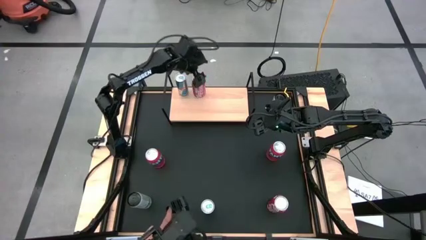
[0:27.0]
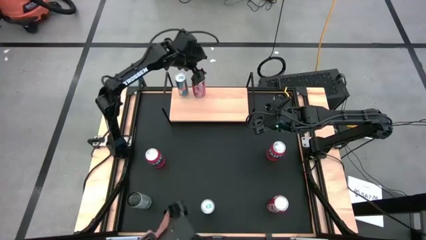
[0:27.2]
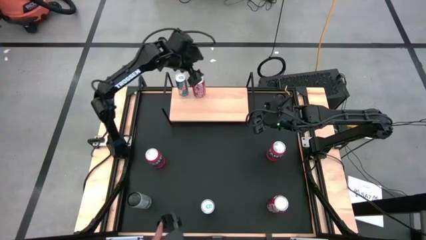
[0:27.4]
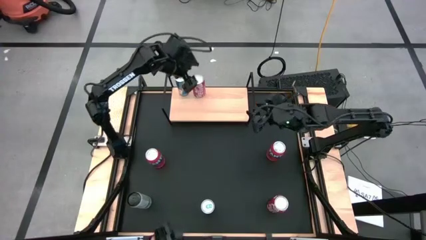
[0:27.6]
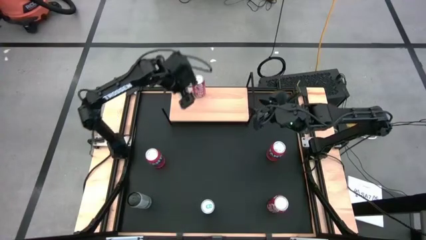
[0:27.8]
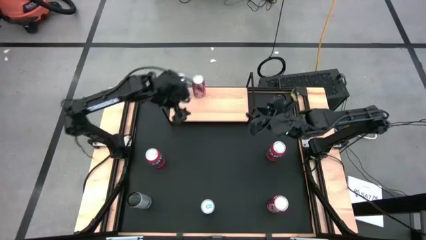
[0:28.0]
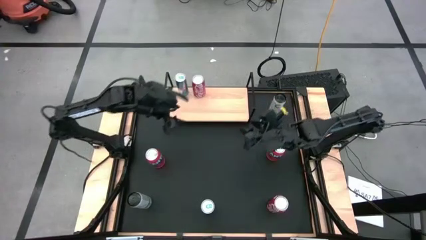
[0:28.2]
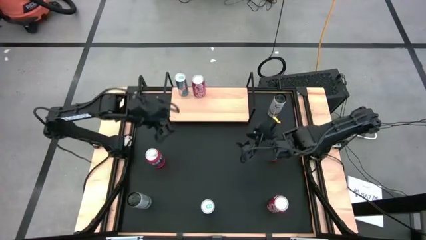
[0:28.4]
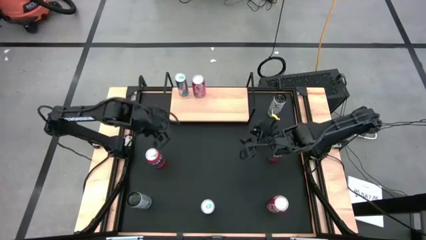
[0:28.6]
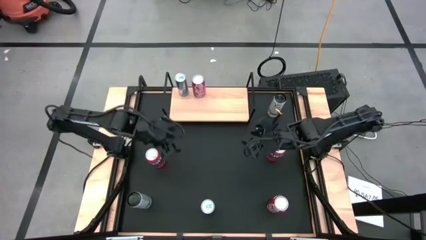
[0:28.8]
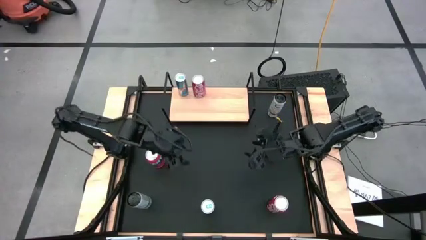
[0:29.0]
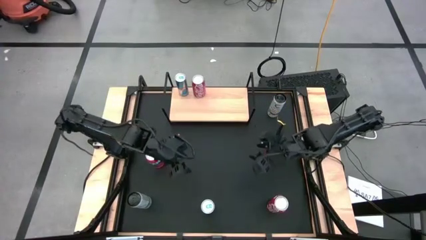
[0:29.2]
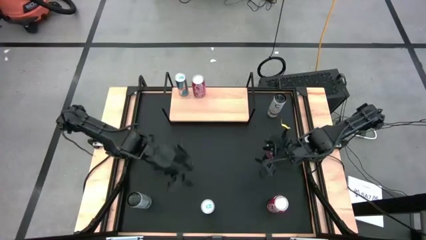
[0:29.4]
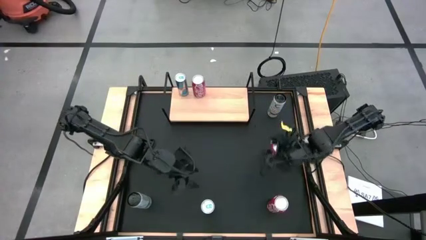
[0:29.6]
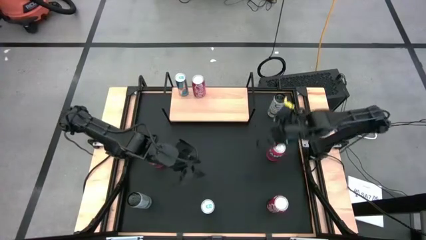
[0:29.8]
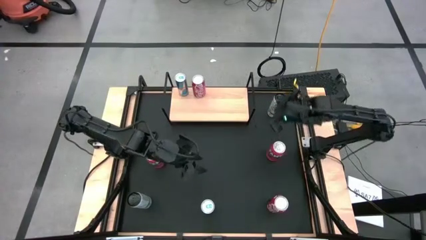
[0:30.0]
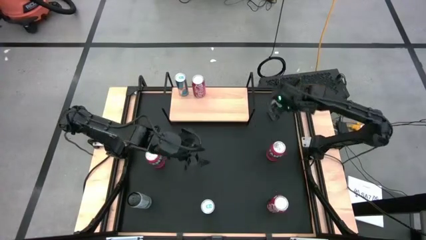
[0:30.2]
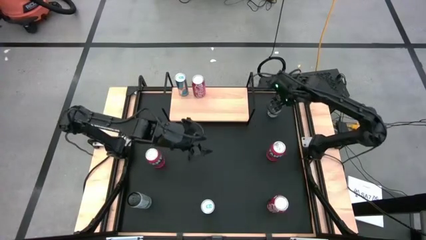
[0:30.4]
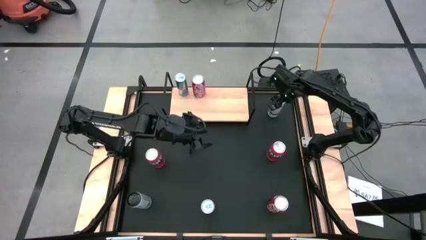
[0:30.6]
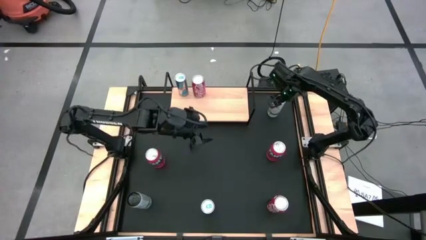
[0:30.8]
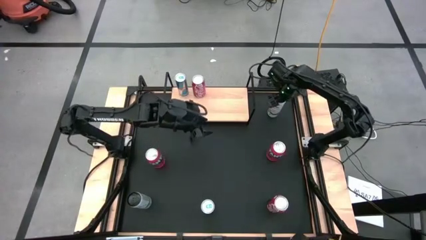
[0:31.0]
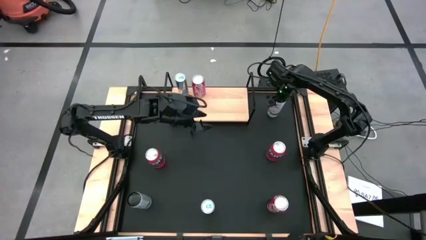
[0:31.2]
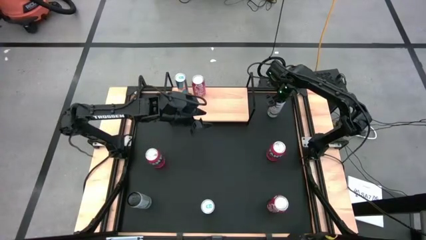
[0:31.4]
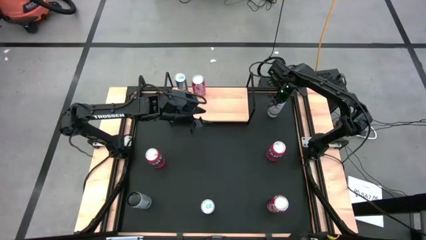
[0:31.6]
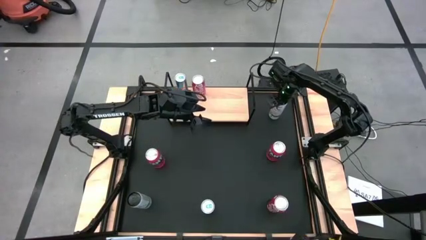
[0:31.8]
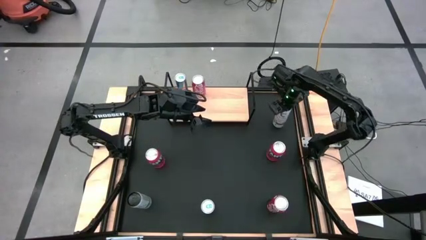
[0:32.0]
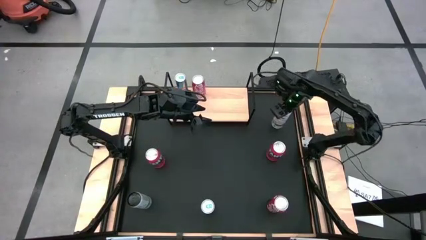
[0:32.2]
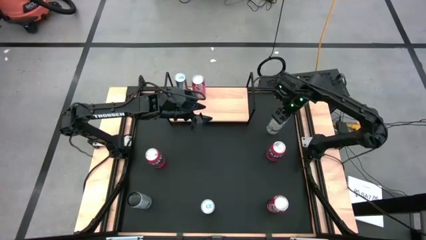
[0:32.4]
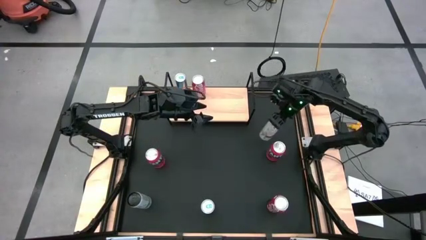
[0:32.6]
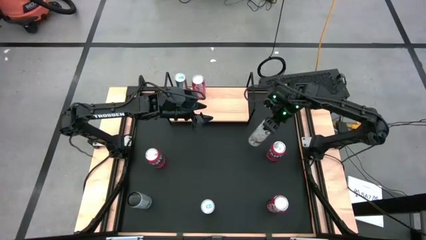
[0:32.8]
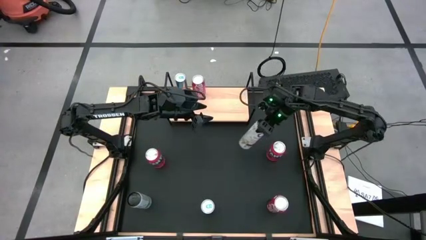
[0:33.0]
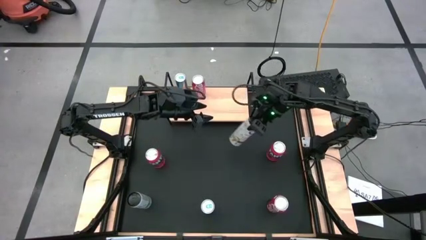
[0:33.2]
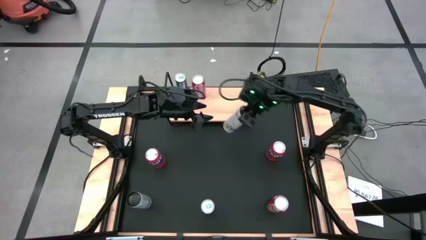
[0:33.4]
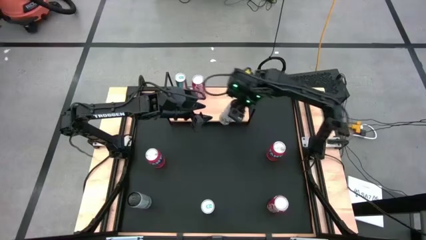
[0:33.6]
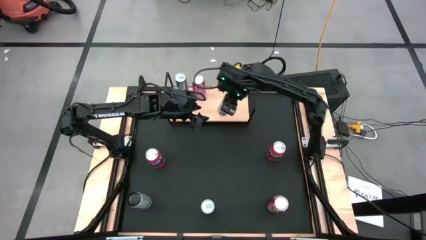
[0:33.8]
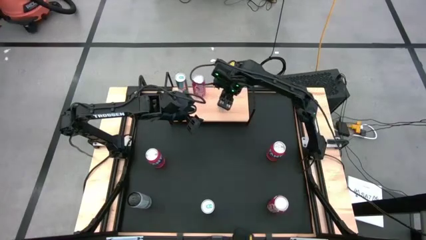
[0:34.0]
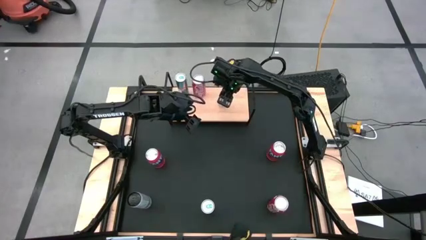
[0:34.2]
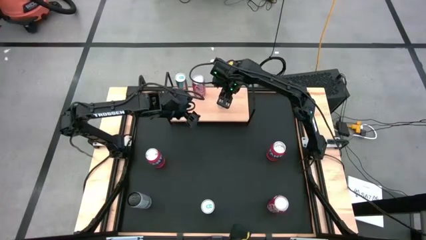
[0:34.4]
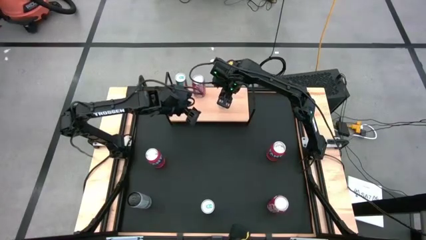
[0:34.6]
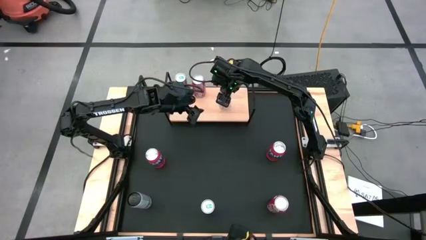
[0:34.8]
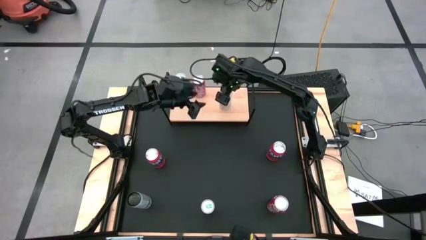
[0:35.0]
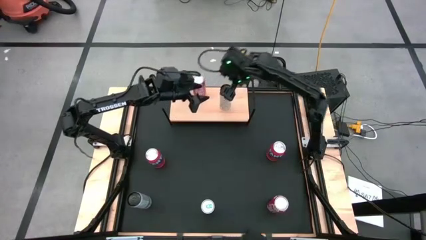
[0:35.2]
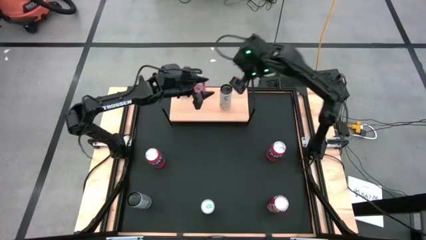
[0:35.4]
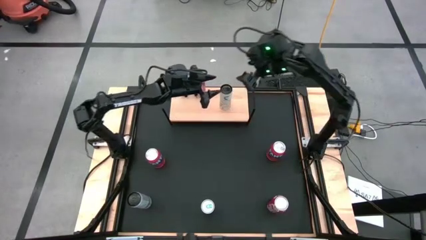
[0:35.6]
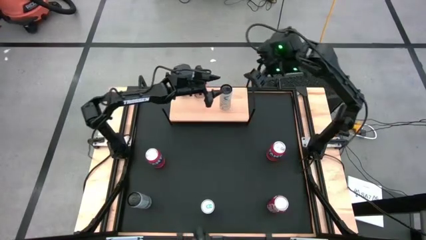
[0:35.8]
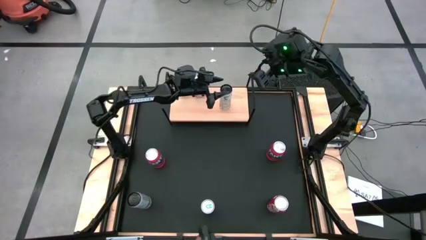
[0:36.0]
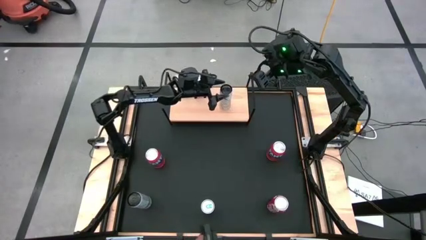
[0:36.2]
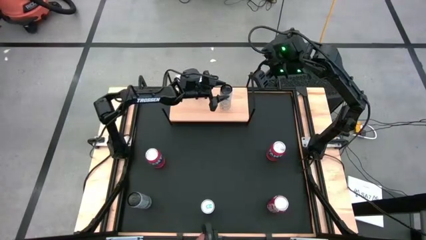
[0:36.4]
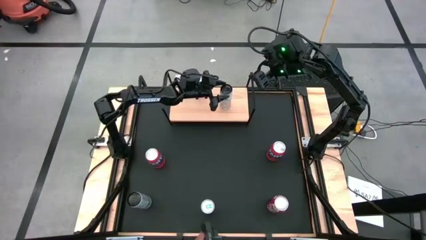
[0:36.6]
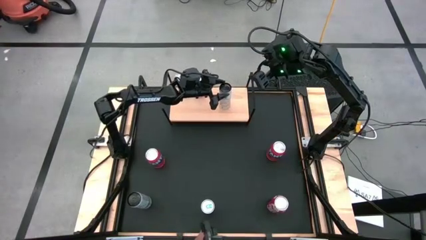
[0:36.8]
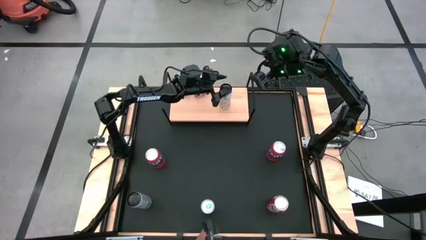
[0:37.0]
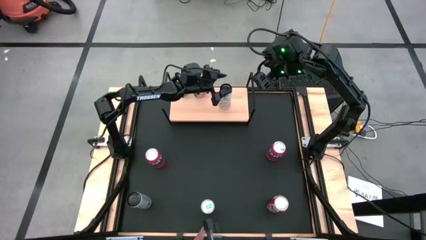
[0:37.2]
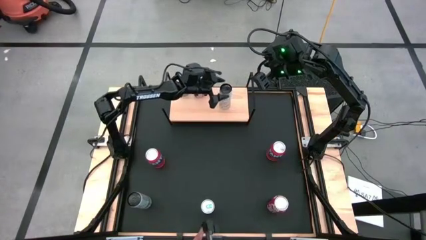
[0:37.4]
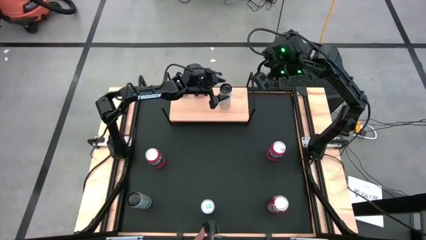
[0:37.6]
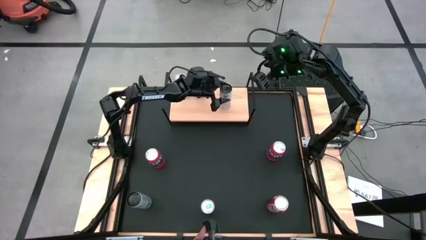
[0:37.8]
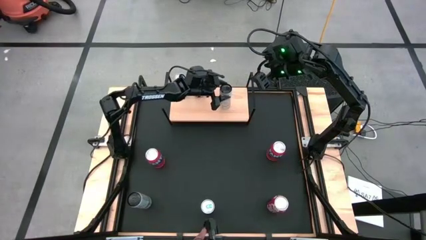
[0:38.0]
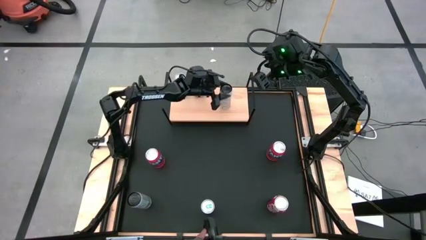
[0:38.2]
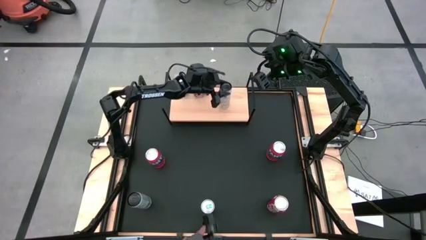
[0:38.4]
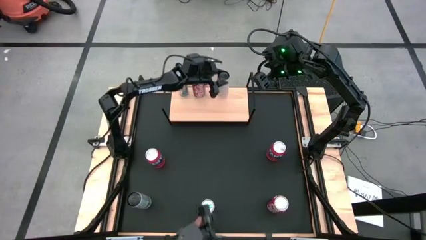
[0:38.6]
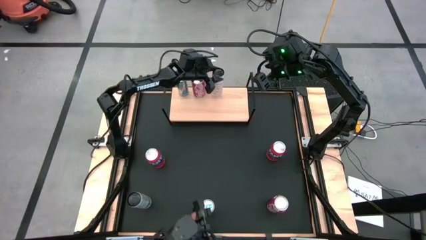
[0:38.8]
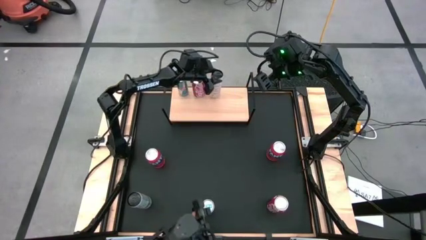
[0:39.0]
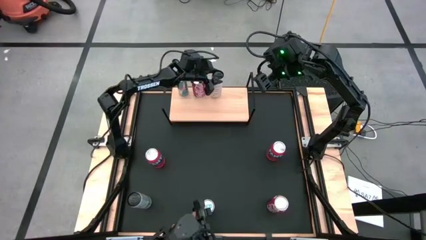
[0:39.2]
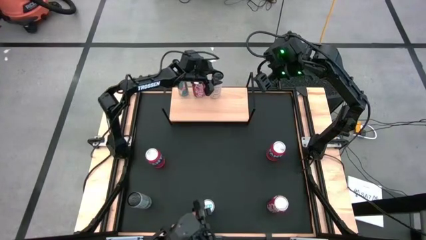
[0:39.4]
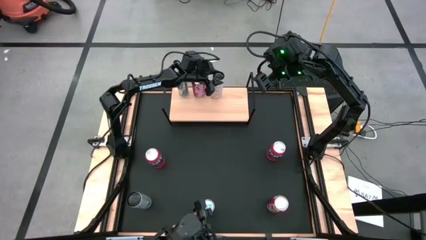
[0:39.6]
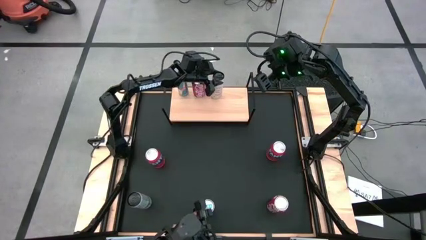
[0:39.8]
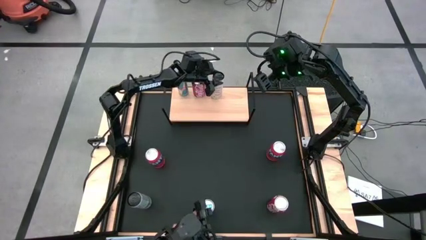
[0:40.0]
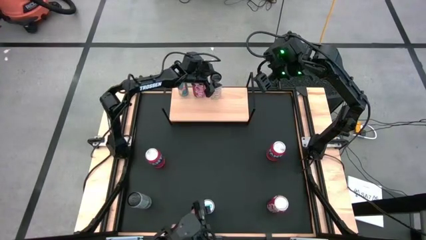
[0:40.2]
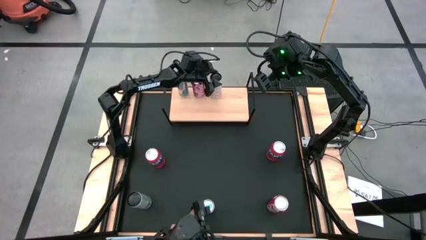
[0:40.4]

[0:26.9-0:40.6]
Task: Place canned beverage on shelf
Put the top white yellow soda can on the shelf

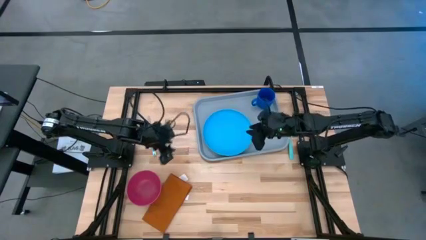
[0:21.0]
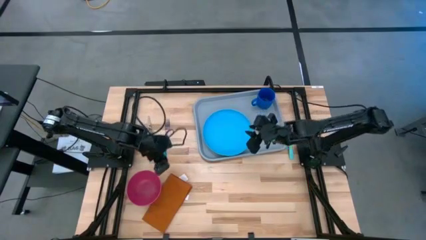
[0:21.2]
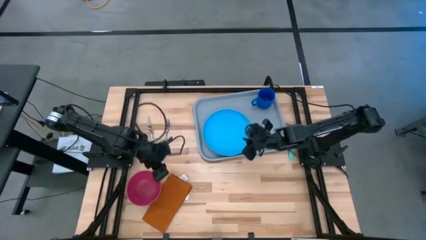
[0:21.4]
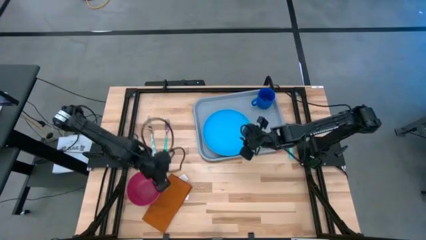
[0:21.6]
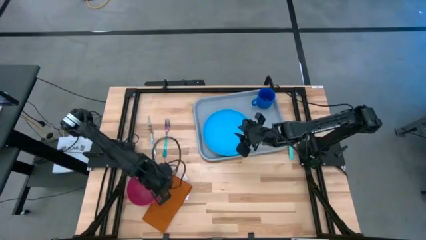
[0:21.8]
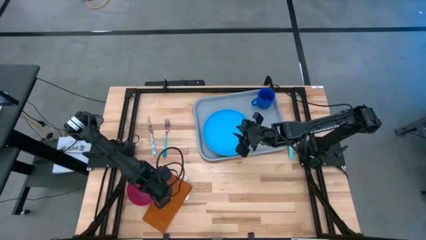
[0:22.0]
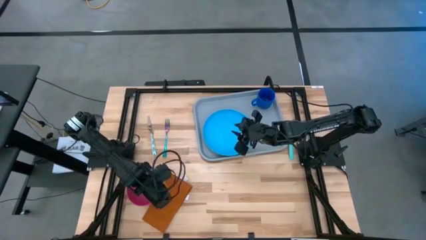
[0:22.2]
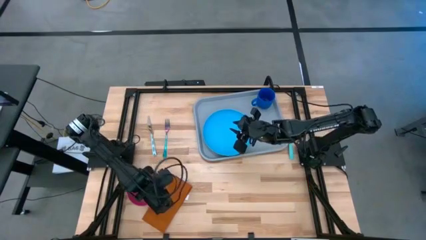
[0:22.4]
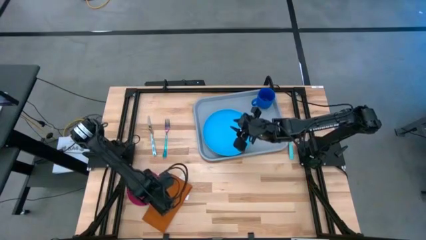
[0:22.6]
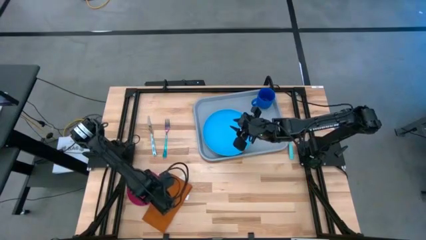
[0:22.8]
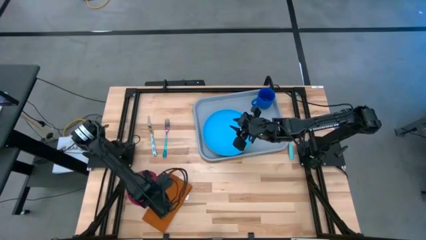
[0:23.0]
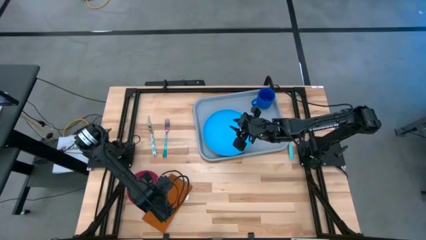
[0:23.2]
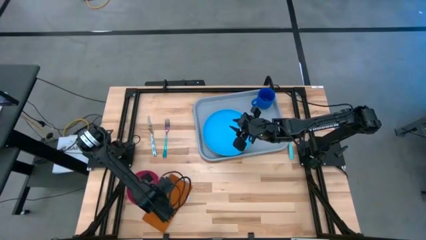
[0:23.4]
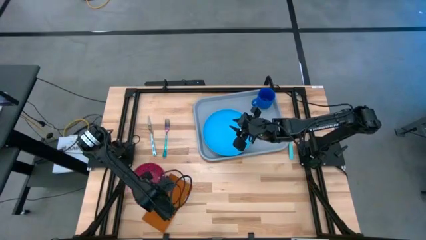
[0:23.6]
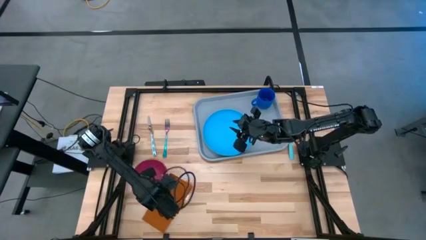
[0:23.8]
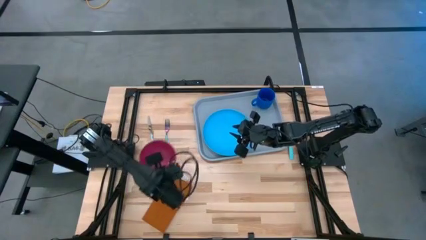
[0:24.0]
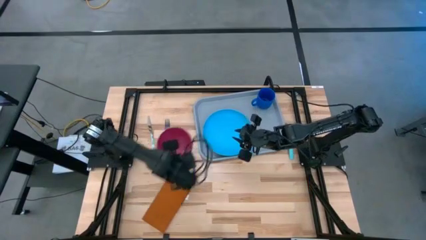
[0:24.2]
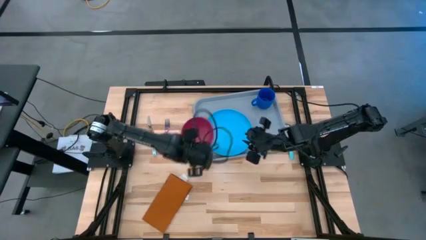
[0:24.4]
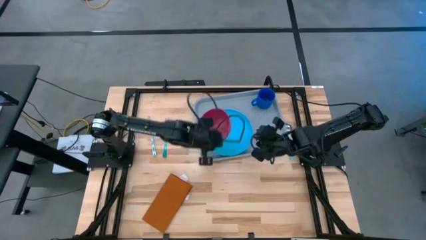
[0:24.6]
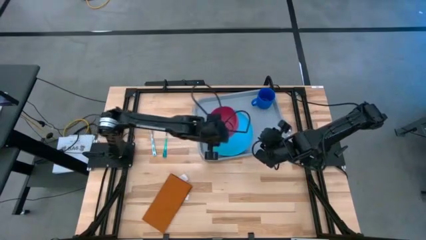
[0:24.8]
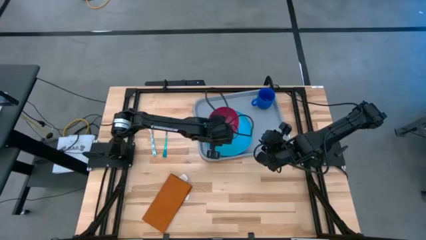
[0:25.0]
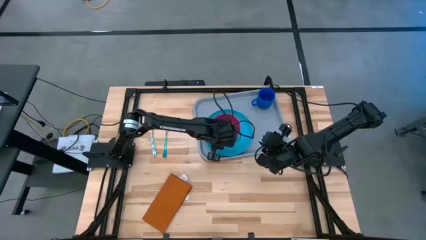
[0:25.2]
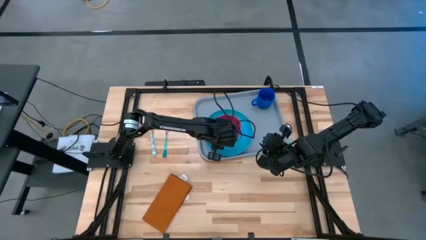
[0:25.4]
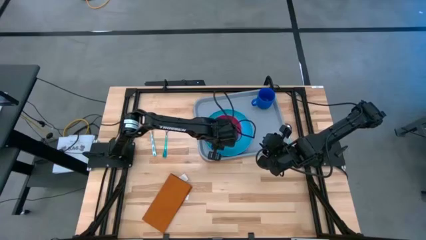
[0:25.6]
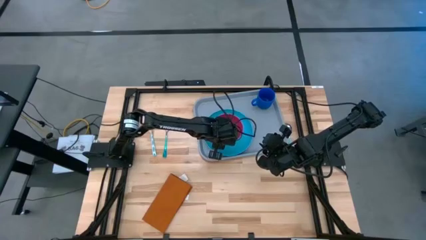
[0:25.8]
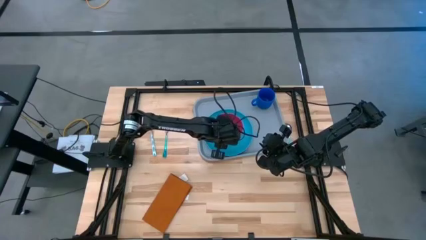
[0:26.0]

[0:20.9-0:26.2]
Task: Set up tray
Put the pink bowl on top of the plate on the gray serving tray
